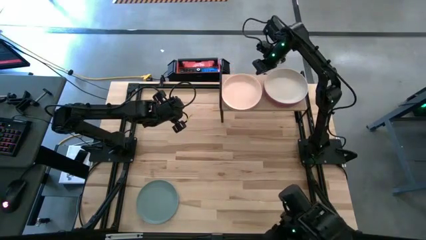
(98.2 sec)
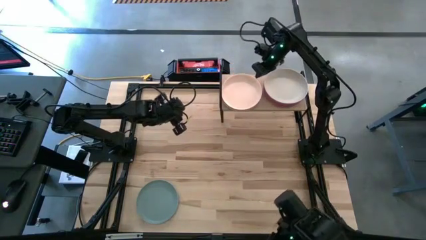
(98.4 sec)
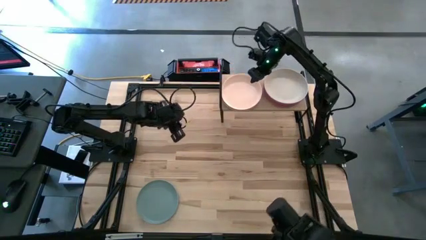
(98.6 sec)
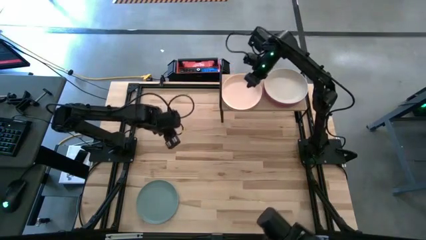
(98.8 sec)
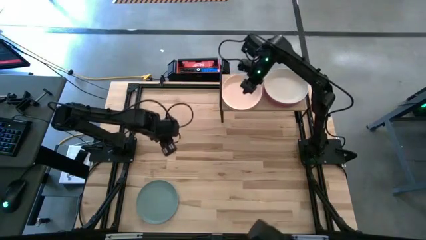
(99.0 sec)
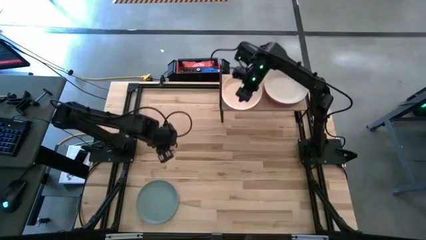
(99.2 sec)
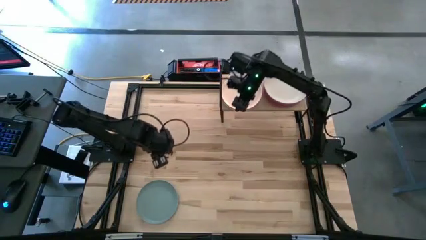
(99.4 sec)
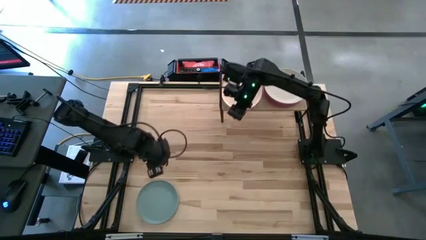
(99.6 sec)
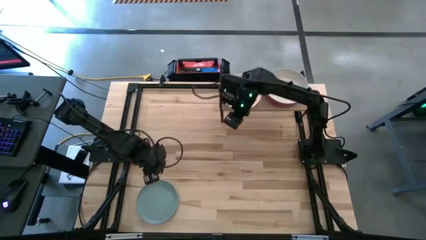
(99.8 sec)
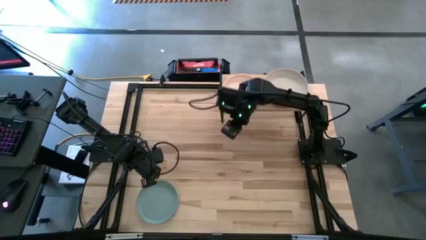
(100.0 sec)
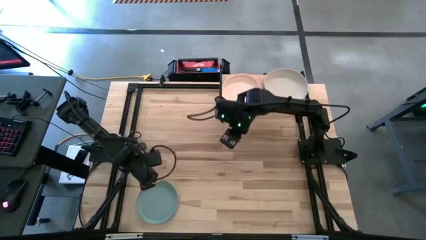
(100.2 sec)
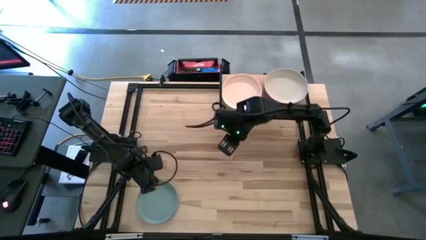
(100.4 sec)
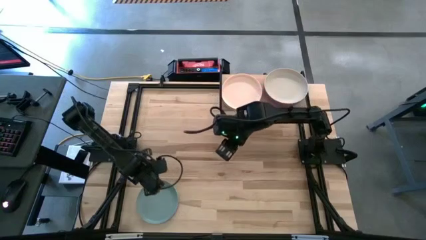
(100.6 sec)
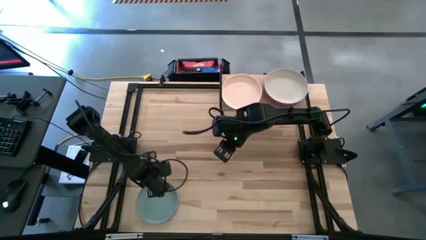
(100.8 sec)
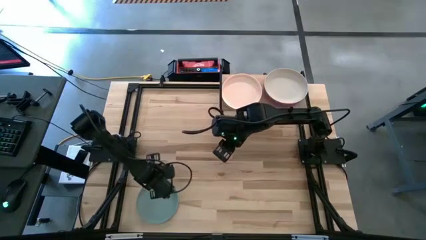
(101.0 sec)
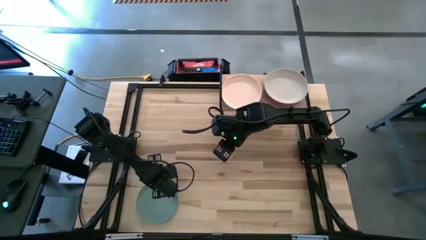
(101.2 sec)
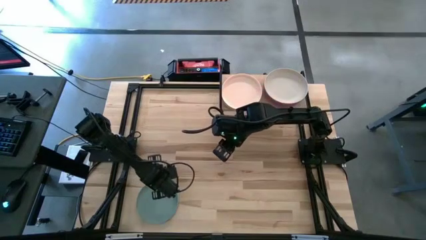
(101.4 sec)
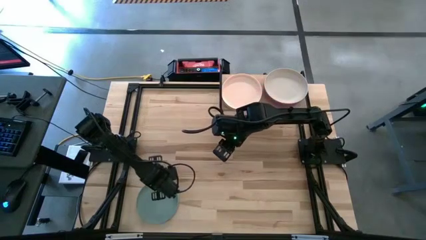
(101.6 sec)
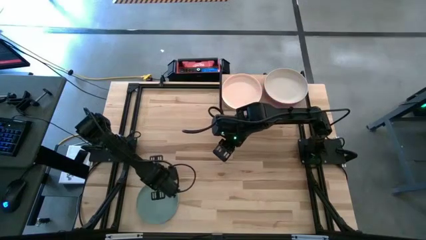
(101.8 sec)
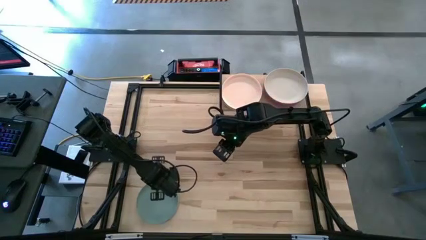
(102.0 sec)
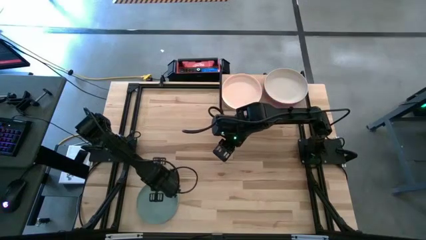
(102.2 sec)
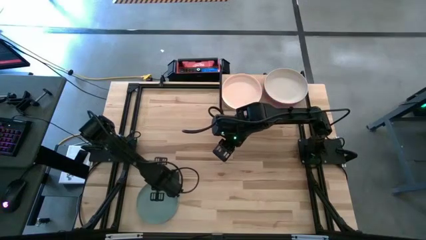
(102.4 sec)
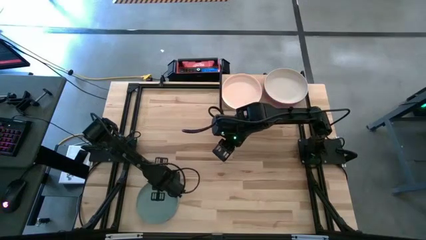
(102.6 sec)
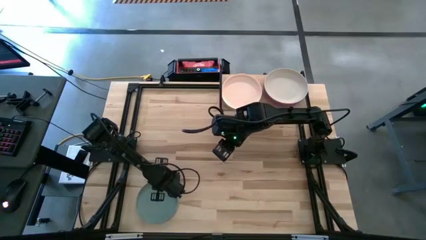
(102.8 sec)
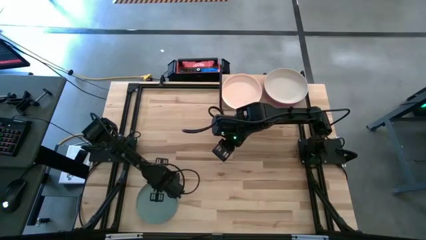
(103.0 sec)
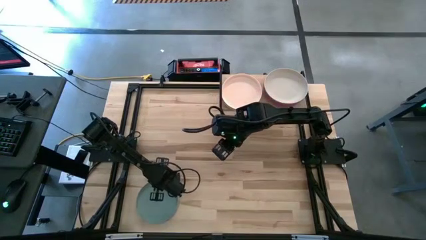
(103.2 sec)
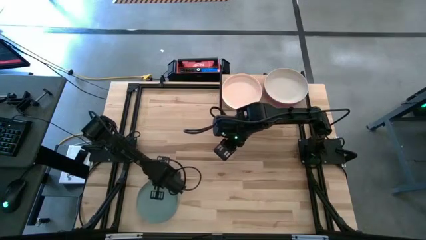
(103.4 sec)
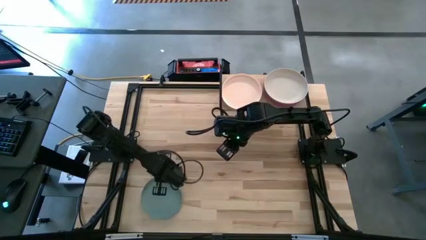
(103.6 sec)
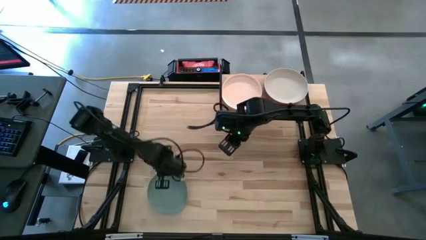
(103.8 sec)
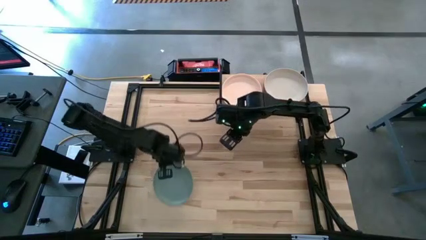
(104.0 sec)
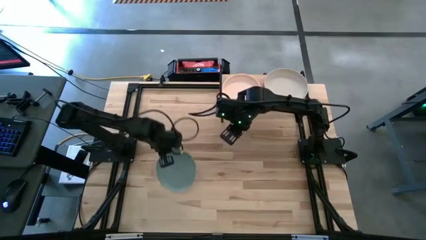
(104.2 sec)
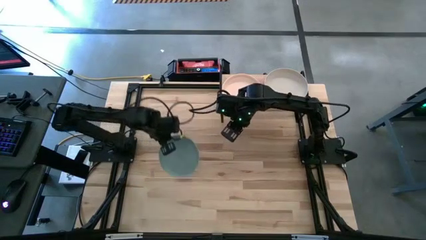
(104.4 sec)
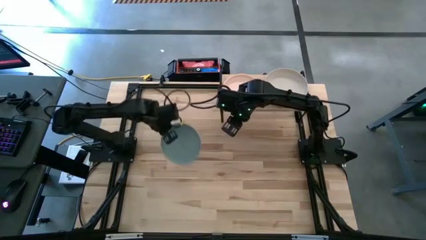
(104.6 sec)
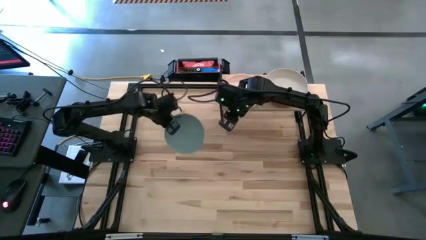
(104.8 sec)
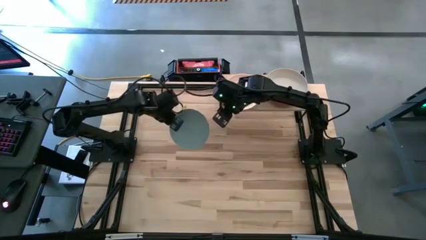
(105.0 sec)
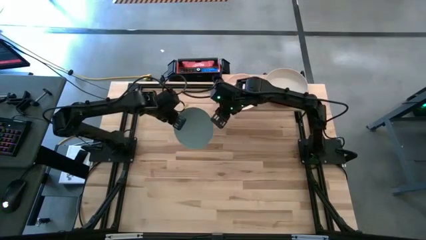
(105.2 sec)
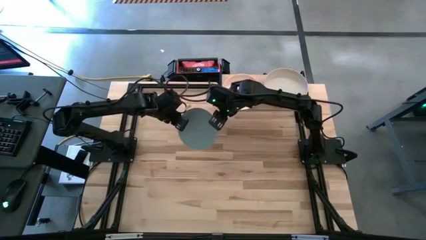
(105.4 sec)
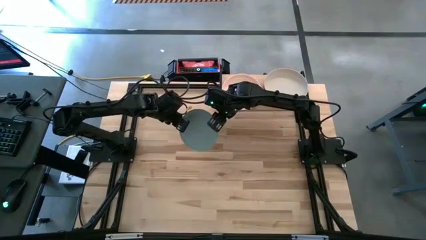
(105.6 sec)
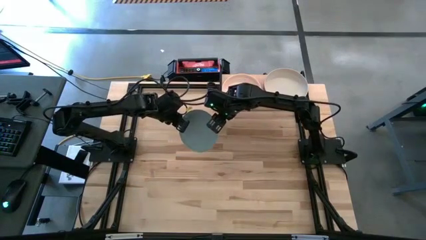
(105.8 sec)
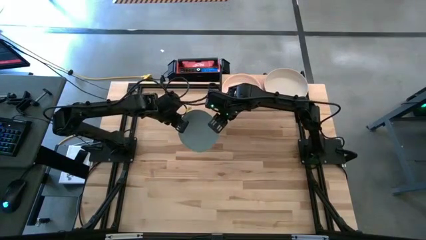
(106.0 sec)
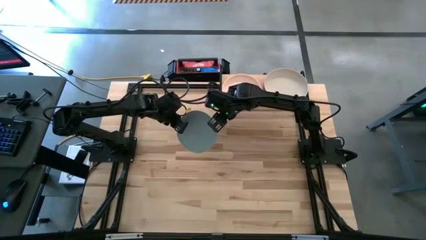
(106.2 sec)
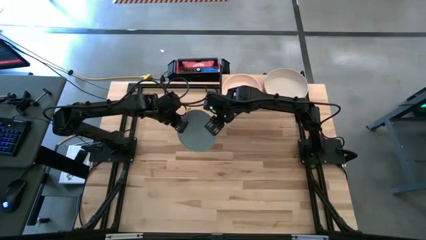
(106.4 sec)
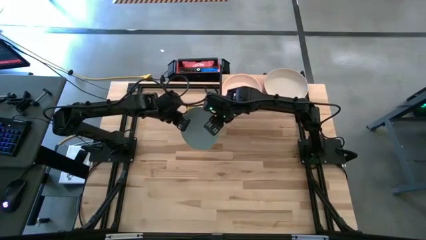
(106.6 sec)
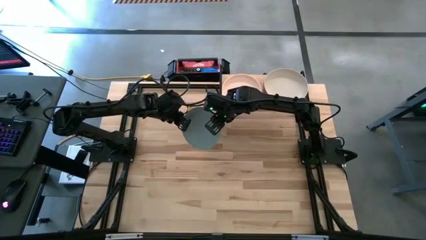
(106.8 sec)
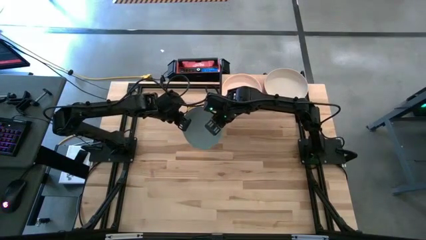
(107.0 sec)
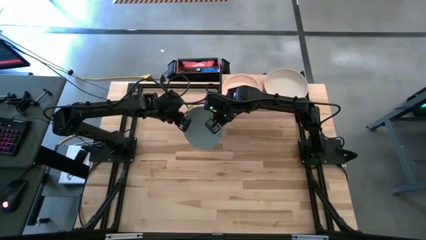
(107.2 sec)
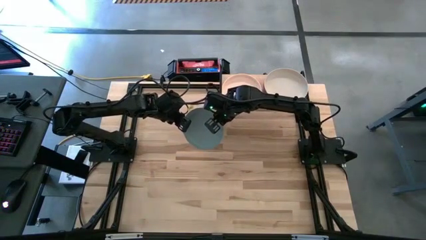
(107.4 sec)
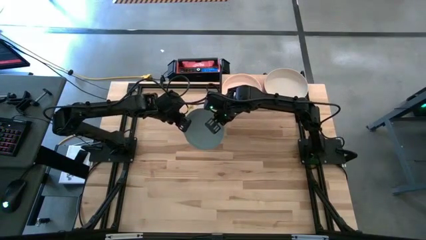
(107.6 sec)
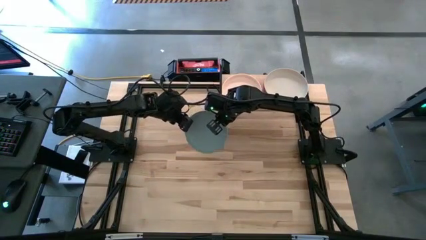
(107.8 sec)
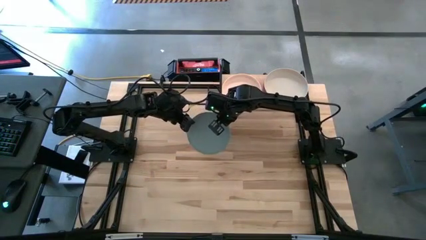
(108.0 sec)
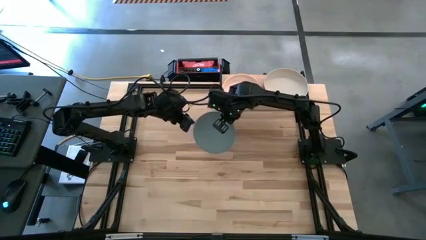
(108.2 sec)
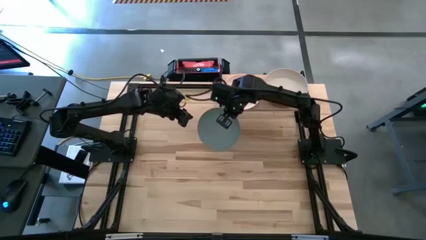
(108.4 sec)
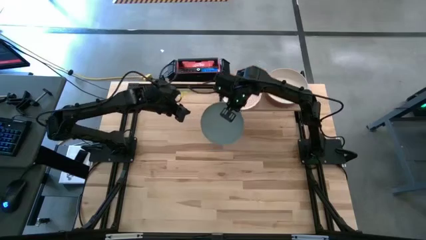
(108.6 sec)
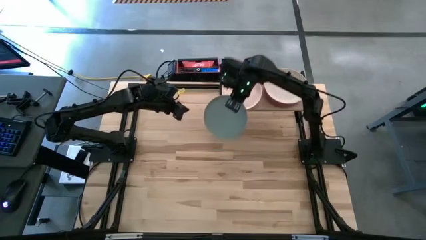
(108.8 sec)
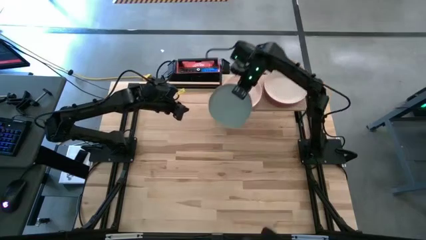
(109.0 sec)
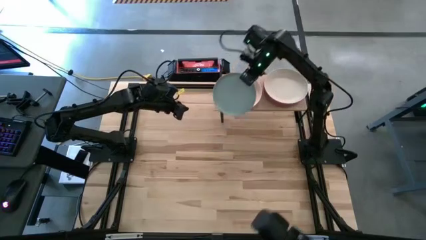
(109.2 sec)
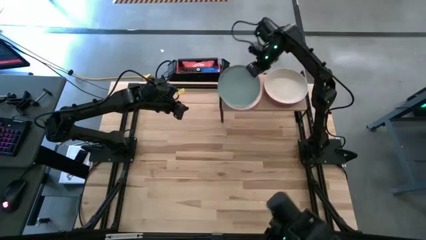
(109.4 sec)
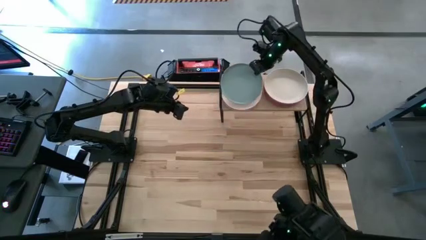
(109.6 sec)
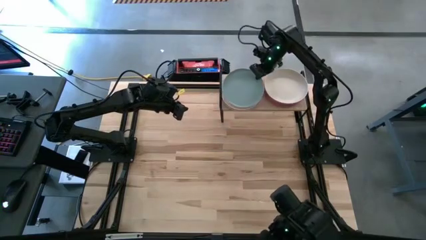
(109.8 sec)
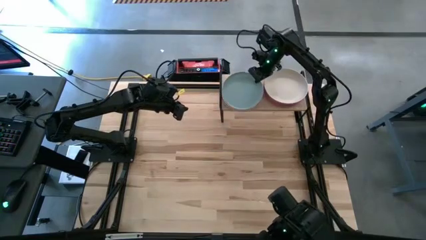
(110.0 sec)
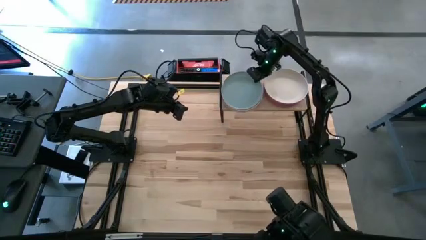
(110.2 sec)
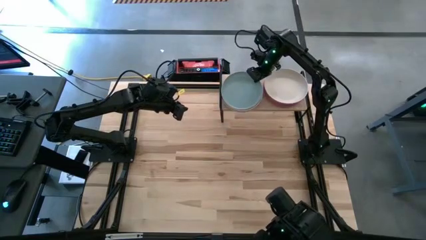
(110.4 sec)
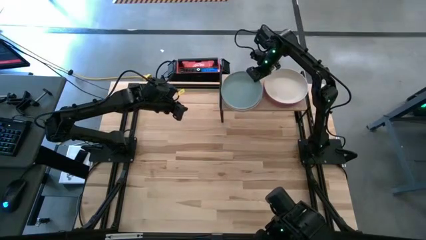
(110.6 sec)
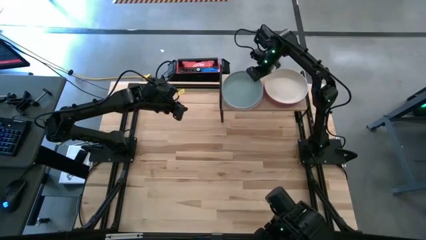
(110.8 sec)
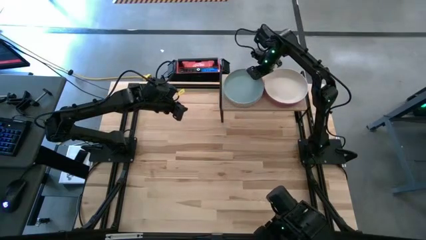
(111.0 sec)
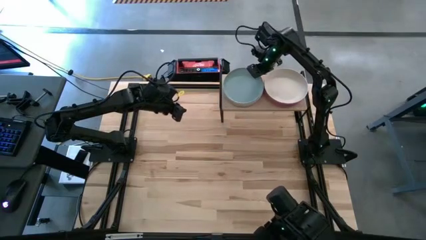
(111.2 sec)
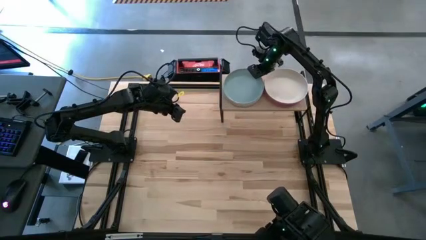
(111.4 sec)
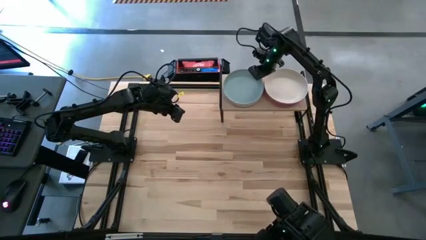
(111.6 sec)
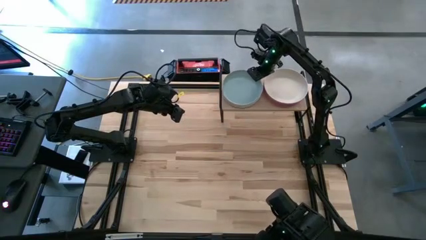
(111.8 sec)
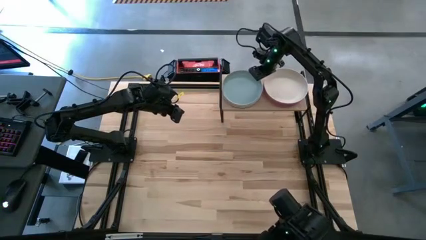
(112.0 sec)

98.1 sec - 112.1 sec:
Task: Place and stack plates onto a shelf
Stack the blue plate on top of the light brown plate

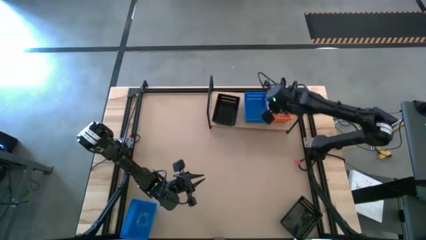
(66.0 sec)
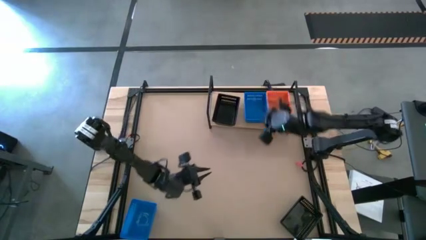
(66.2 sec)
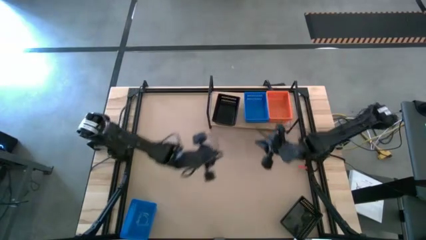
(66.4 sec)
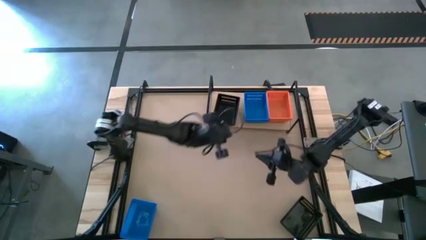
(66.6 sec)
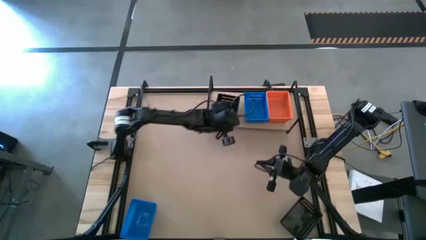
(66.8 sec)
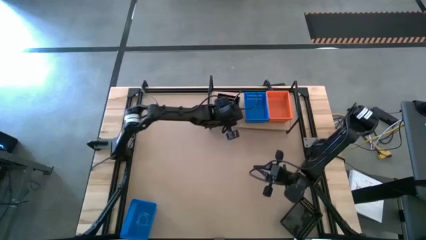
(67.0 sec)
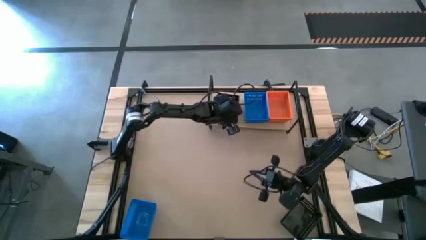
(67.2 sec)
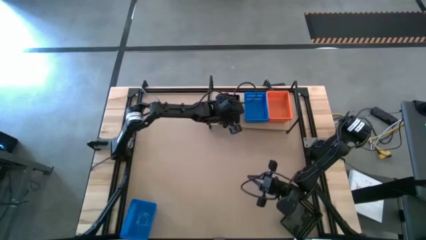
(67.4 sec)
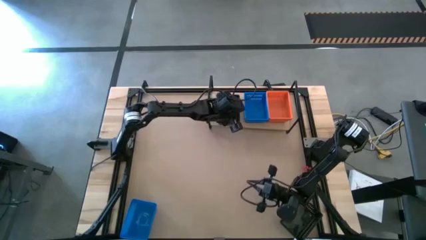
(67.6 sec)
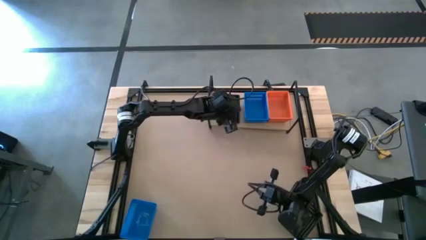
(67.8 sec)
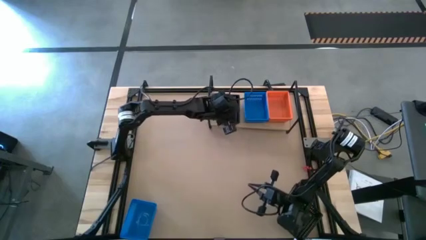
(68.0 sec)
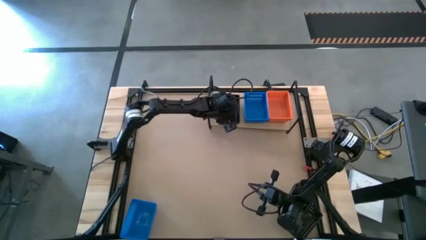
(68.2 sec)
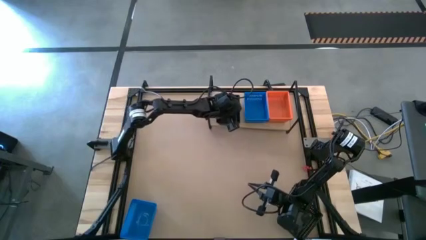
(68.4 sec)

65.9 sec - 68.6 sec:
Task: Stack baskets on shelf by color
Adjust the black baskets on the shelf
